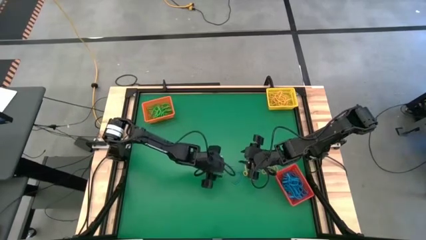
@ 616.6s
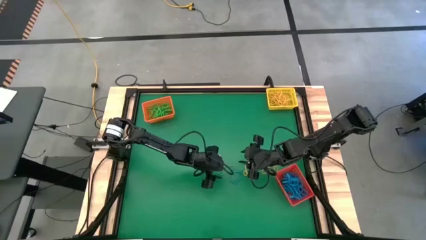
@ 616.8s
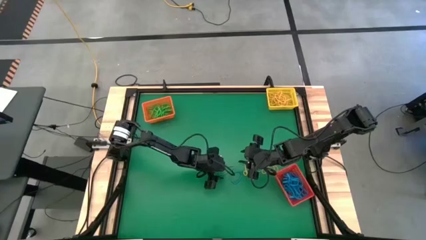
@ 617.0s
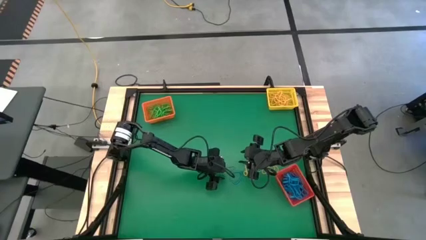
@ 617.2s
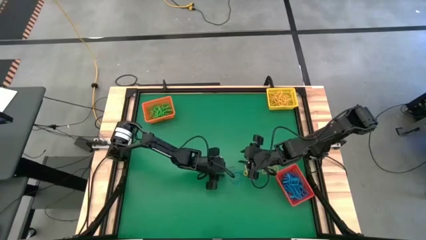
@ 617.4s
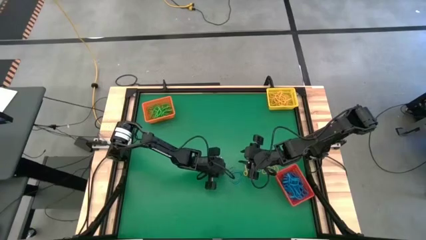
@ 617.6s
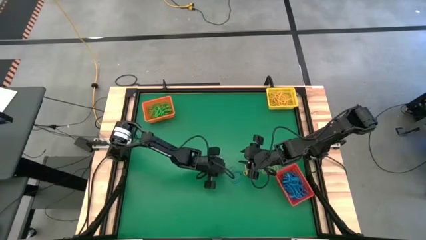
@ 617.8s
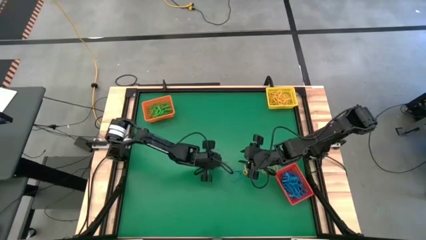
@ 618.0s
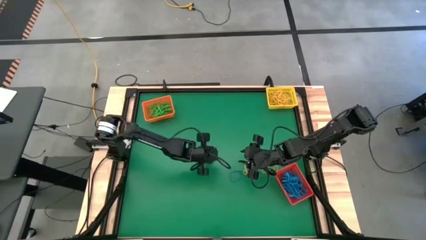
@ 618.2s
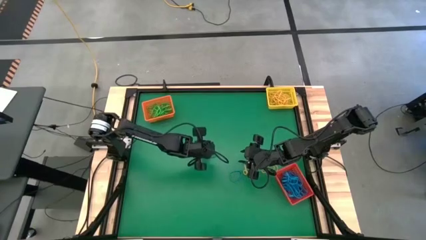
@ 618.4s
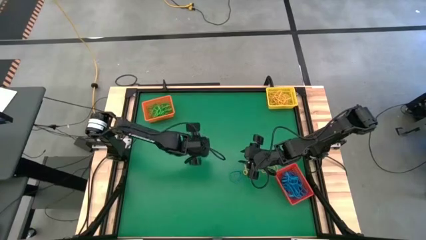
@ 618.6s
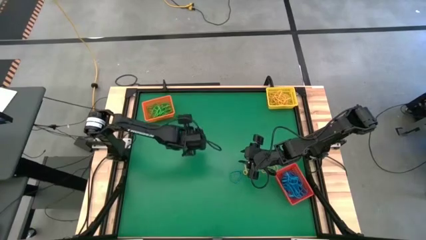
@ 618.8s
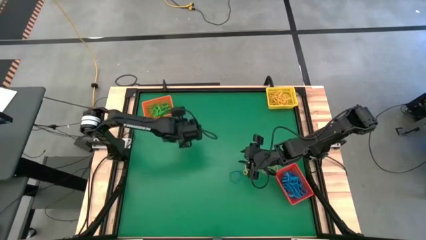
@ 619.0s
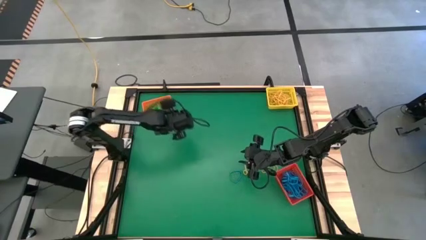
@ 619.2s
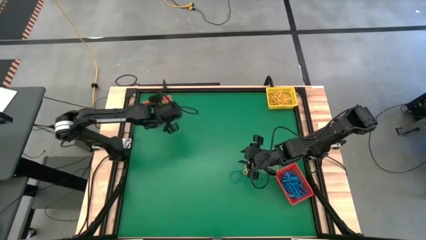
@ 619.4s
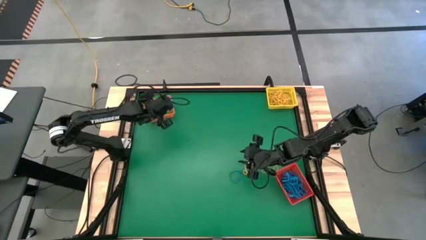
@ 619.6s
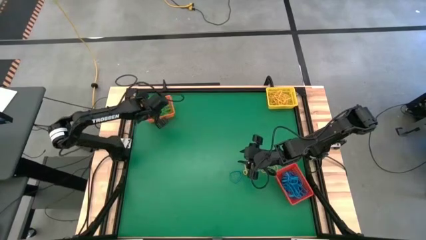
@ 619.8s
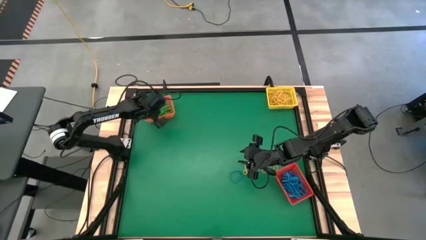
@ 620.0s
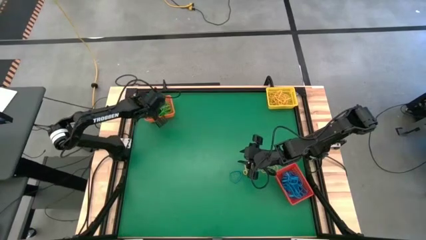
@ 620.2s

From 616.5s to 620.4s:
Task: Sort rubber bands into baskets
Put the green rubber band into the orange bin

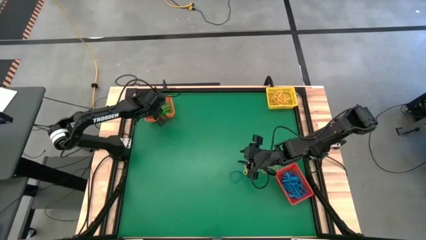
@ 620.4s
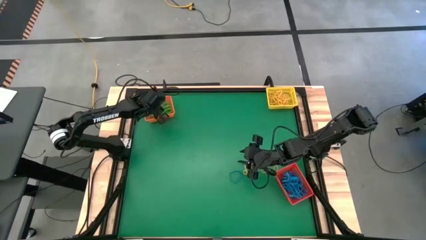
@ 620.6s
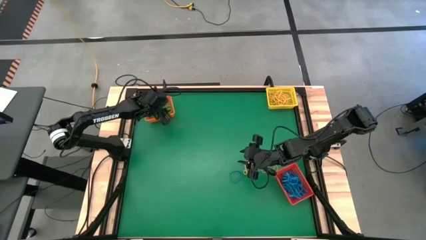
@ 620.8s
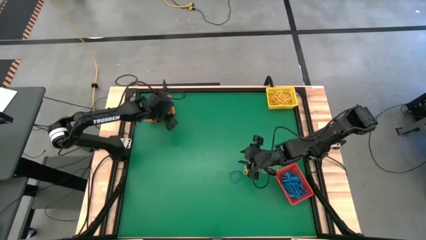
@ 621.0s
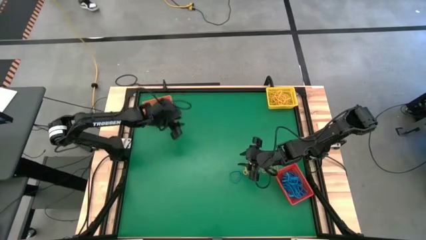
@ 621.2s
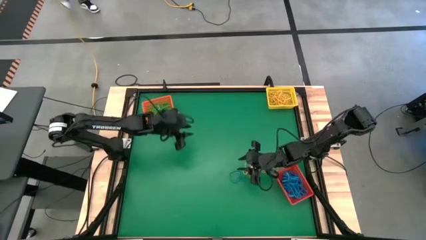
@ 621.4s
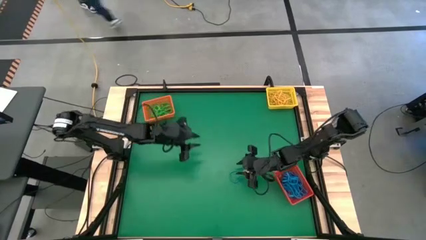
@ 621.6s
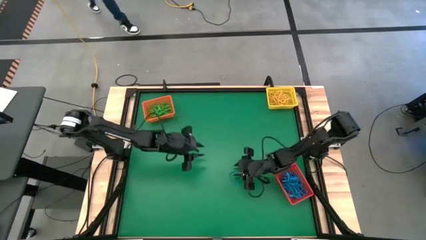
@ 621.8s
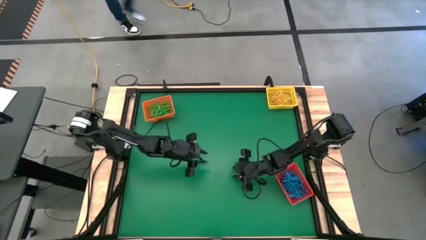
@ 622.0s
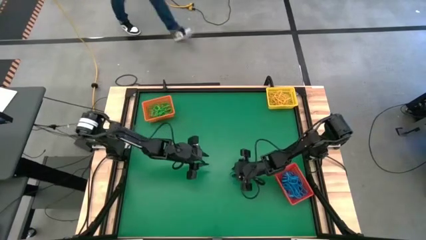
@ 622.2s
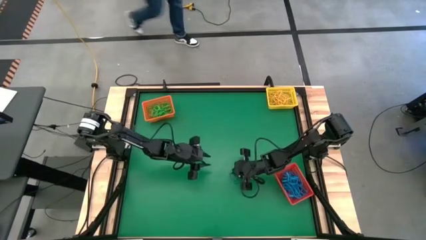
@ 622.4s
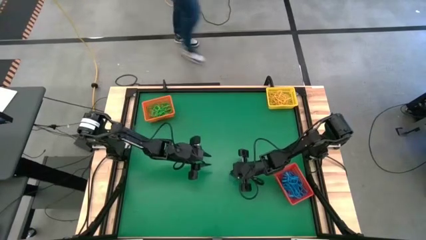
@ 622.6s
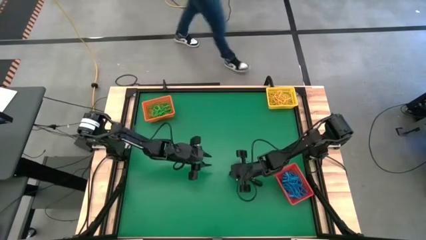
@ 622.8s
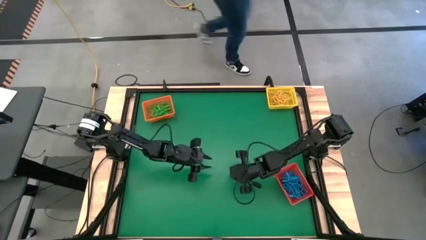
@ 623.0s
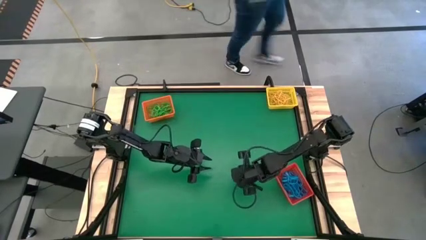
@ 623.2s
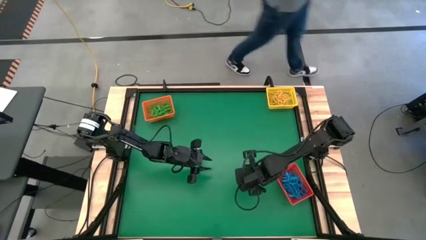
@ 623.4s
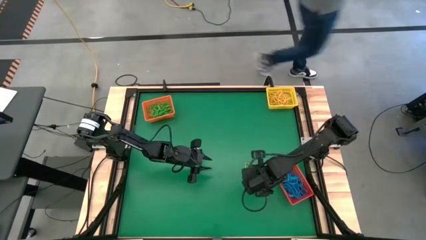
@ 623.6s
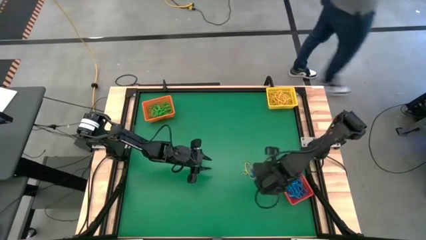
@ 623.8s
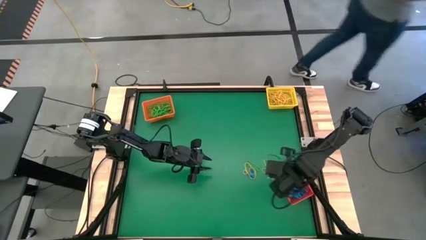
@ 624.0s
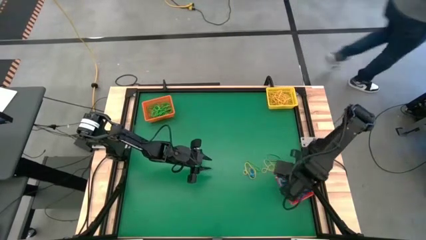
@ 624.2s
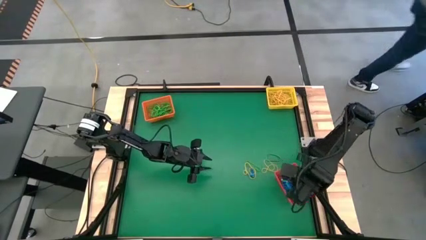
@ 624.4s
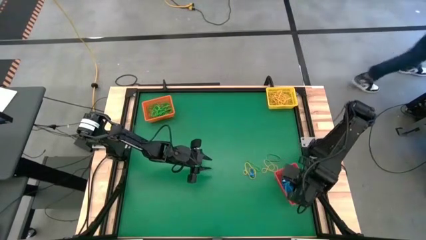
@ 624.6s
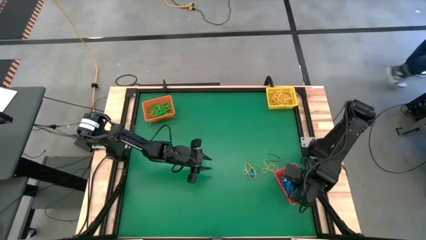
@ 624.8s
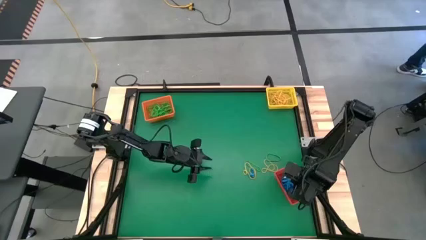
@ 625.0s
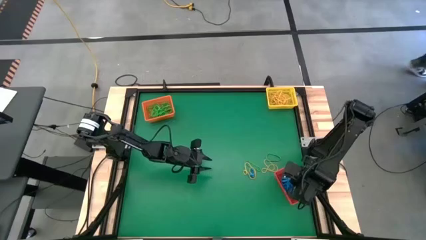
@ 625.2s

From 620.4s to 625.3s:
Put the blue rubber band into the red bin

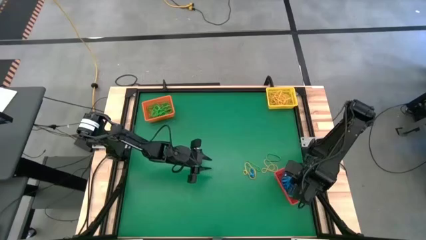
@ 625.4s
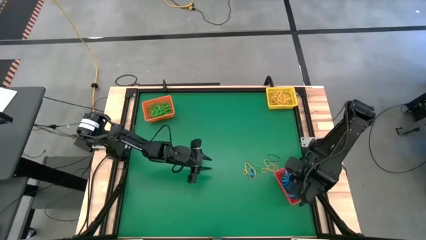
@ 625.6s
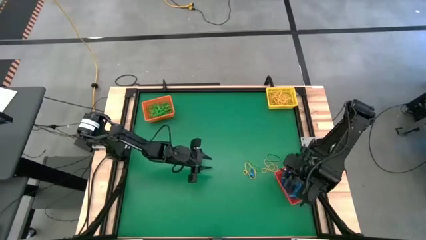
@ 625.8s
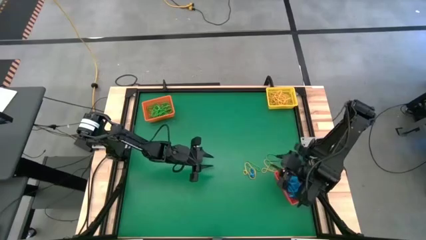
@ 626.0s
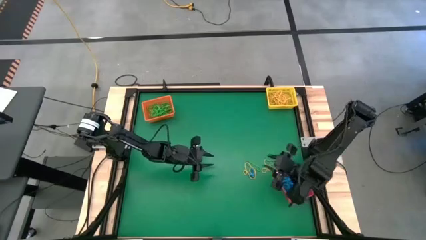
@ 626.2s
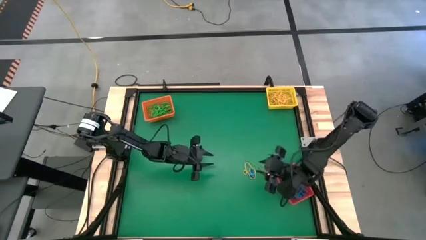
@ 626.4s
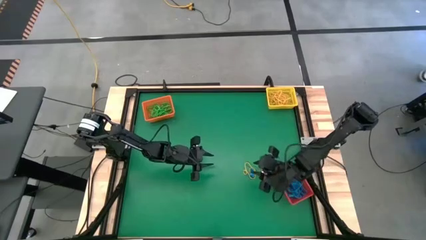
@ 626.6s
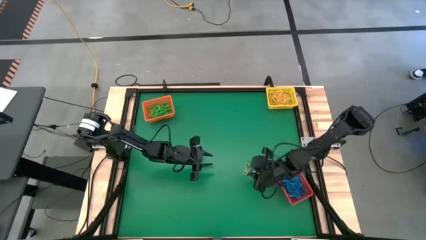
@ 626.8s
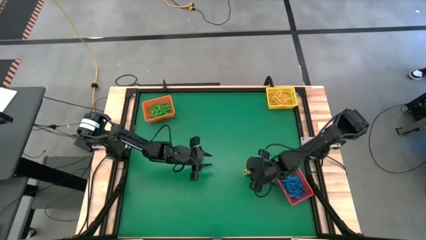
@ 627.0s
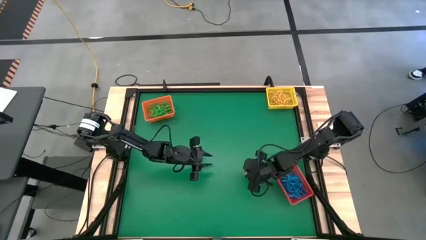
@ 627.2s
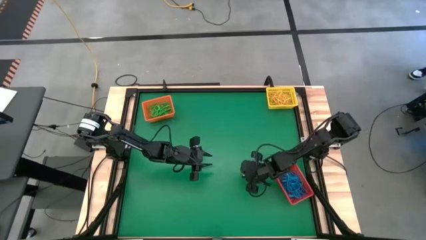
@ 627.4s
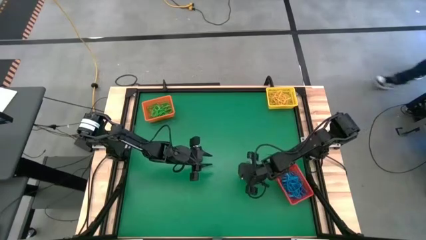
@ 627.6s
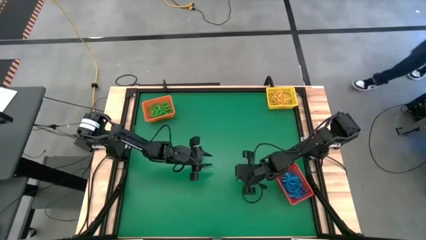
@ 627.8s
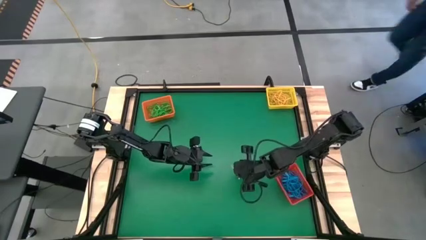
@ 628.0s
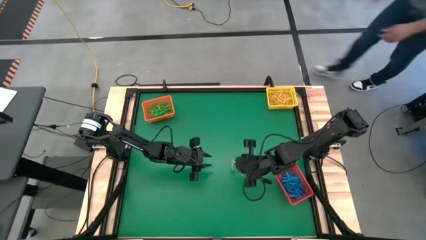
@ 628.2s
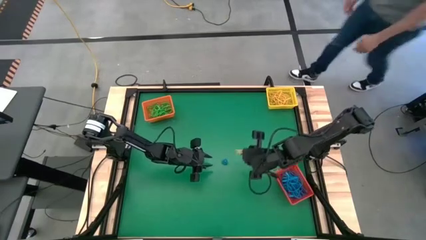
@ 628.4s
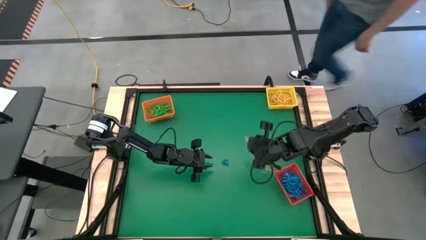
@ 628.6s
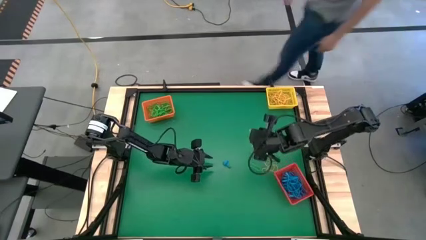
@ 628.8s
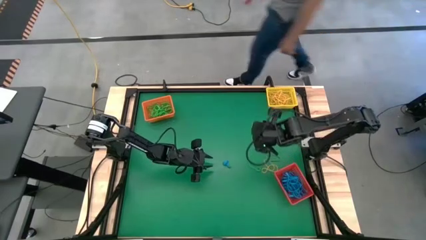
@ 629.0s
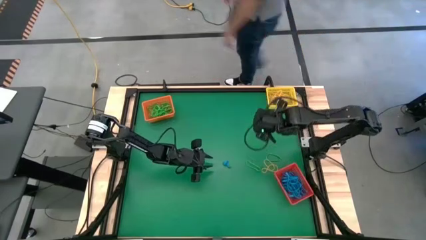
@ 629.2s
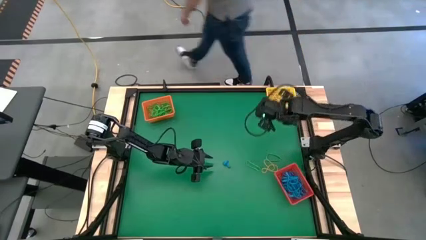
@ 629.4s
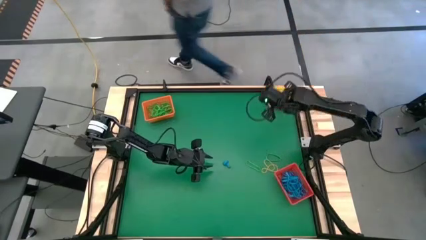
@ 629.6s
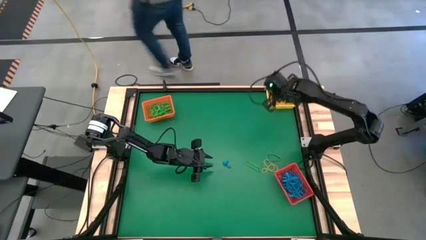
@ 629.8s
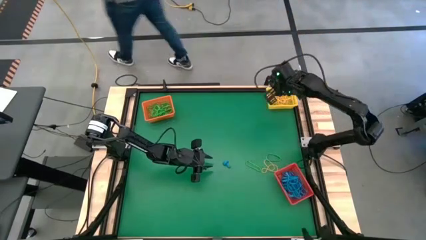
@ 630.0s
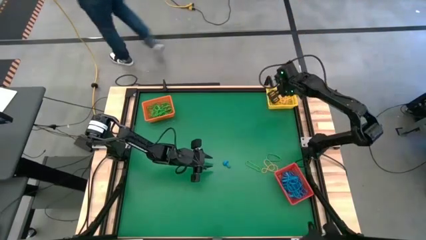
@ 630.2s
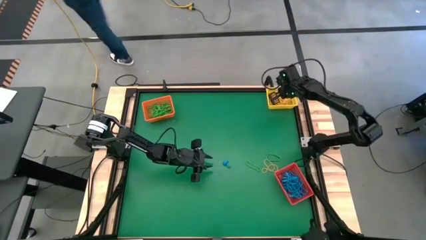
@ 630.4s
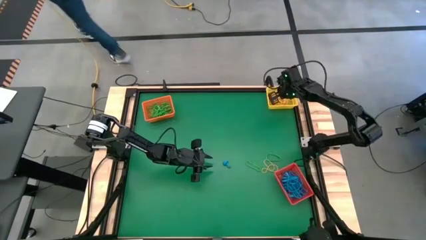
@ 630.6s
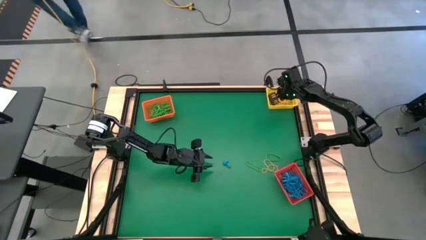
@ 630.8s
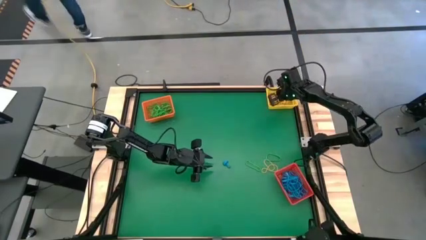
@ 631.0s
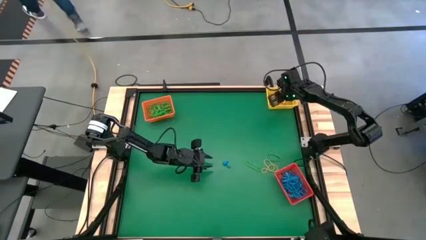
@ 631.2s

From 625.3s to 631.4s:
Put the yellow rubber band into the yellow bin

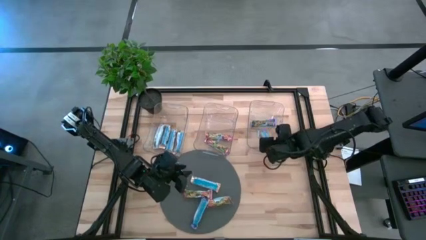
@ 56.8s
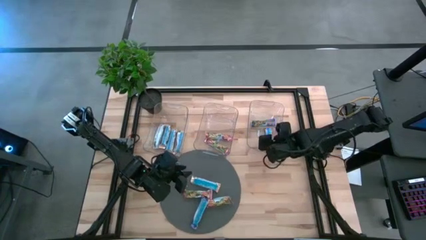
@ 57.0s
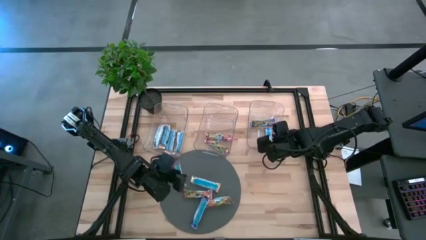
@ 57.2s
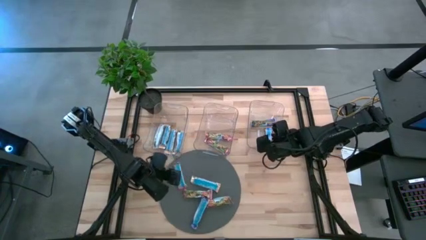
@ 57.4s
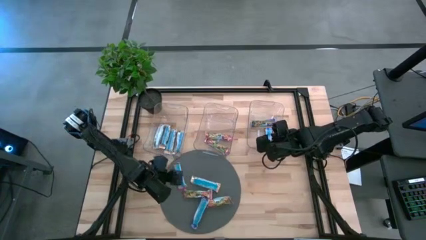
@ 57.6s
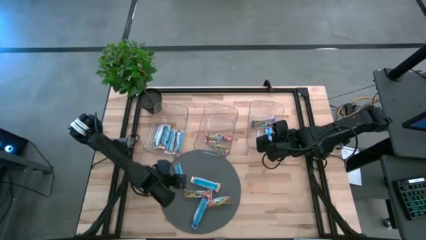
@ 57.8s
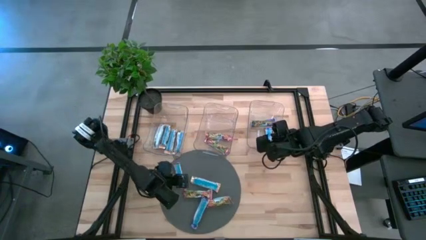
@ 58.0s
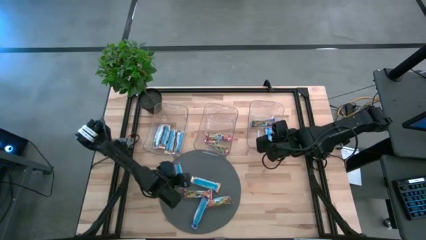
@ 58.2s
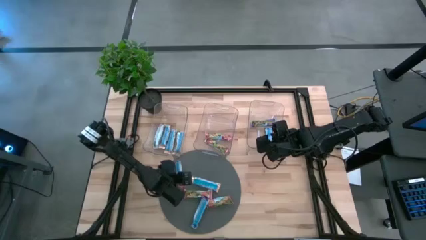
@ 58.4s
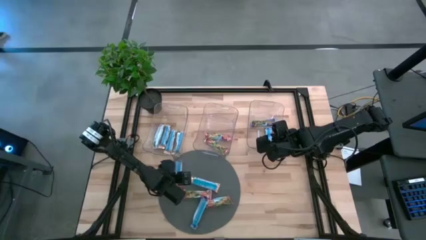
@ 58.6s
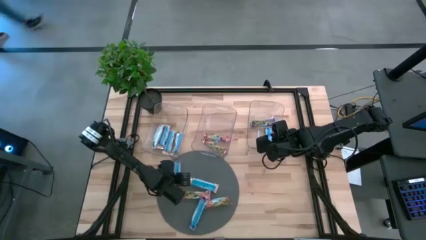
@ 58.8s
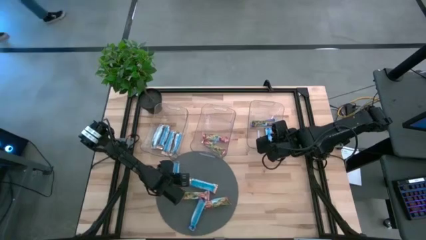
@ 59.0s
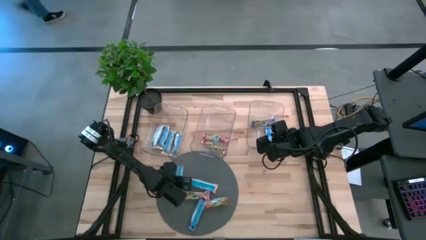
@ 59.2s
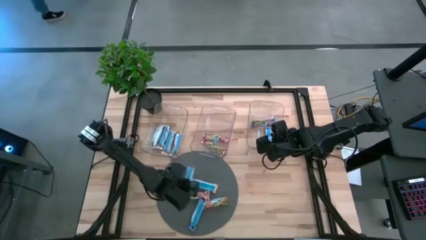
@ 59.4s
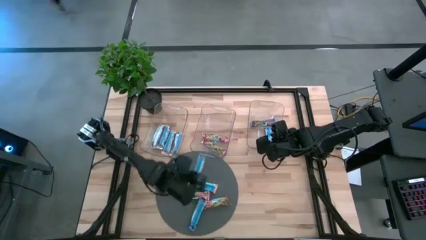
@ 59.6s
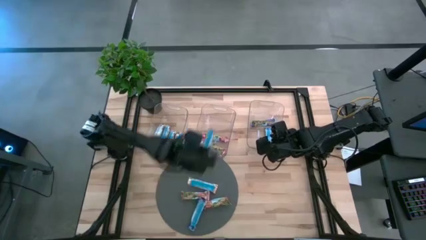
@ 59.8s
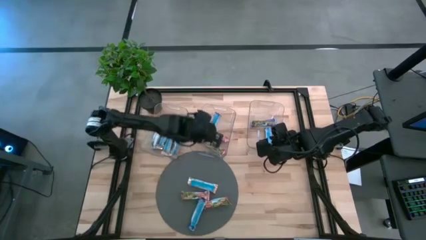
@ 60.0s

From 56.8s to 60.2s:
Task: Pick and place Granola Bars by type
Put the red granola bar into the middle transparent bin
